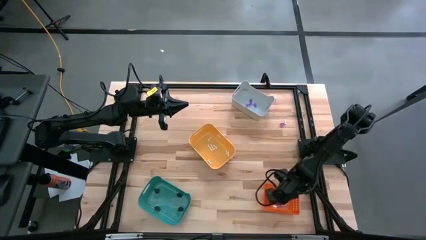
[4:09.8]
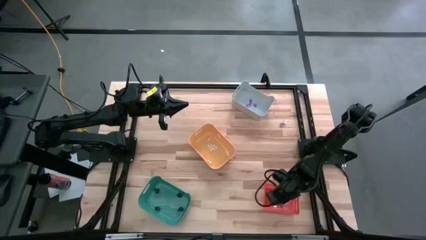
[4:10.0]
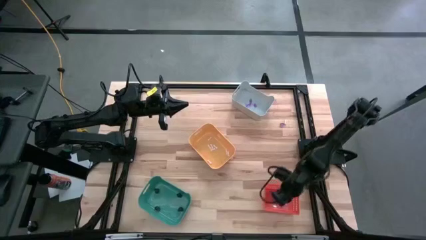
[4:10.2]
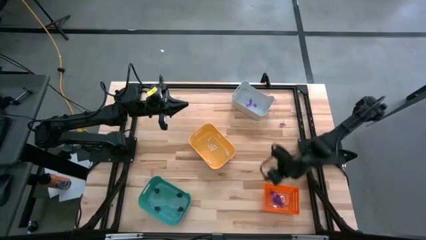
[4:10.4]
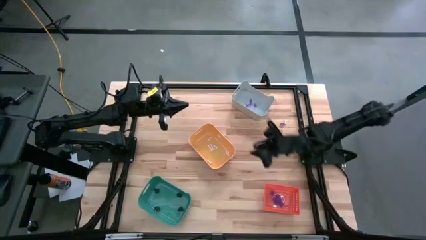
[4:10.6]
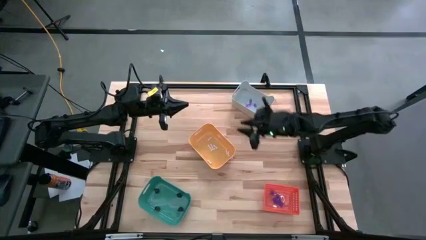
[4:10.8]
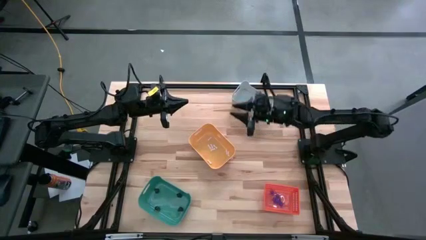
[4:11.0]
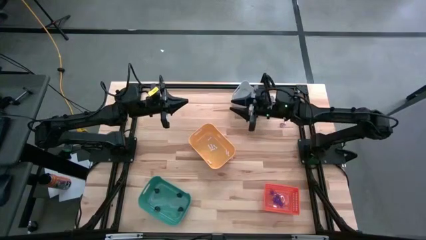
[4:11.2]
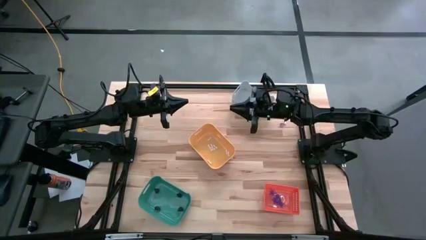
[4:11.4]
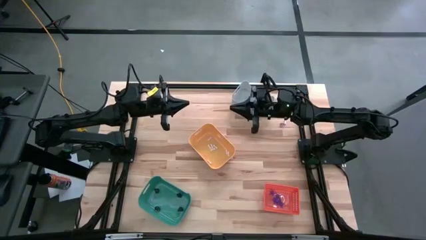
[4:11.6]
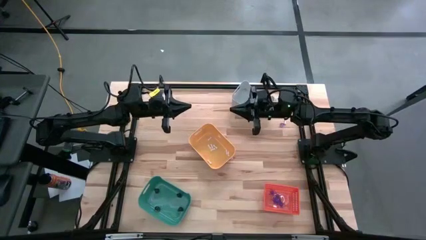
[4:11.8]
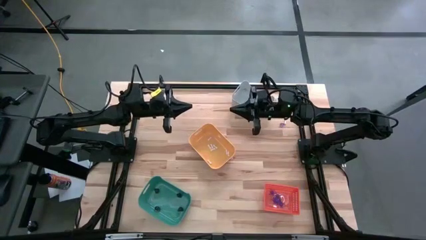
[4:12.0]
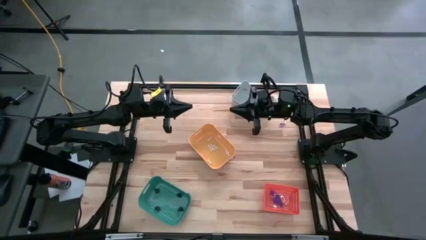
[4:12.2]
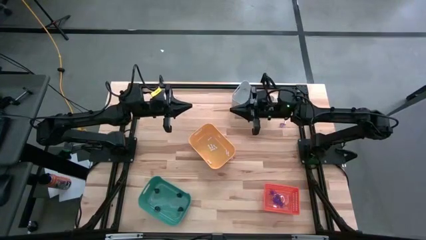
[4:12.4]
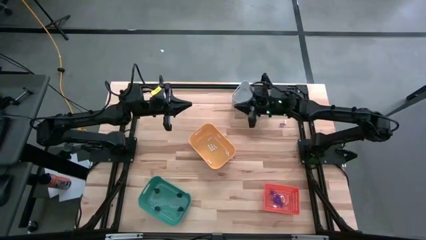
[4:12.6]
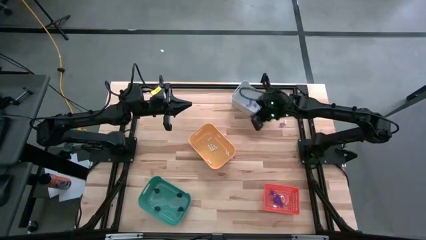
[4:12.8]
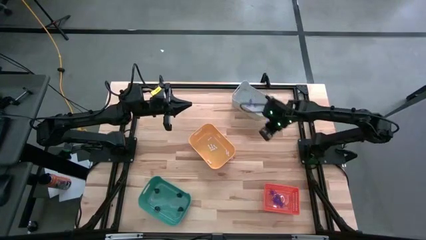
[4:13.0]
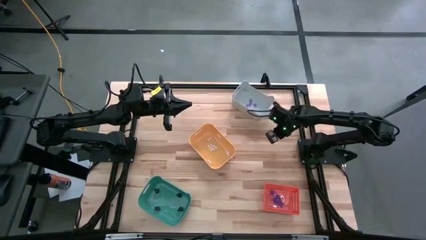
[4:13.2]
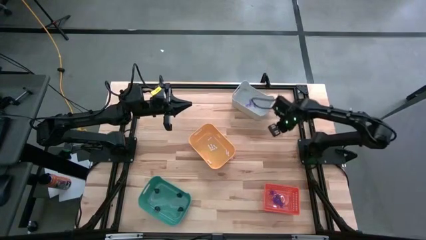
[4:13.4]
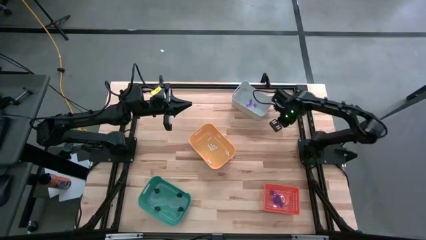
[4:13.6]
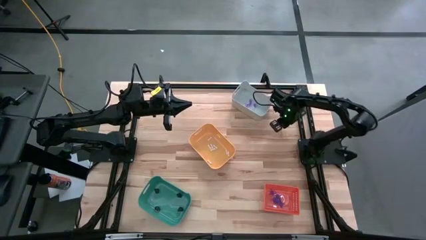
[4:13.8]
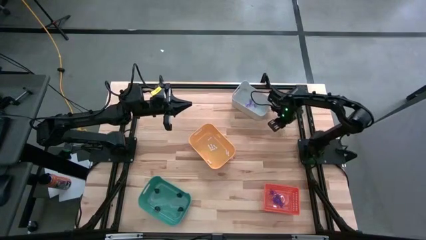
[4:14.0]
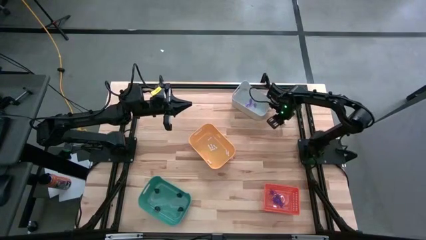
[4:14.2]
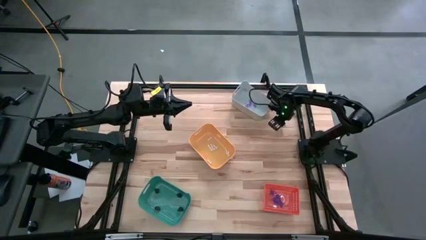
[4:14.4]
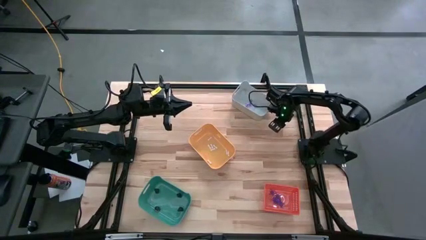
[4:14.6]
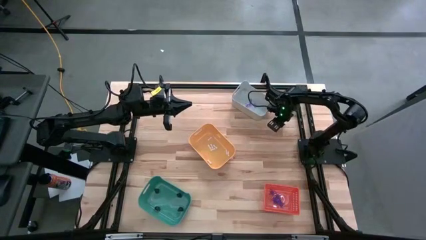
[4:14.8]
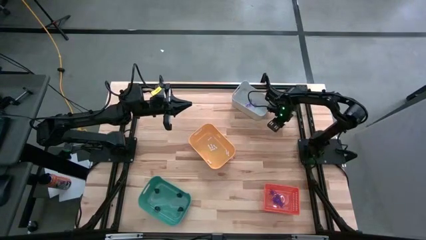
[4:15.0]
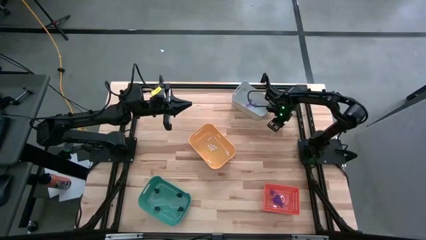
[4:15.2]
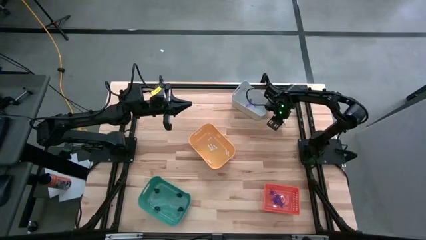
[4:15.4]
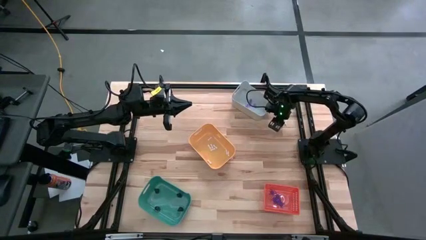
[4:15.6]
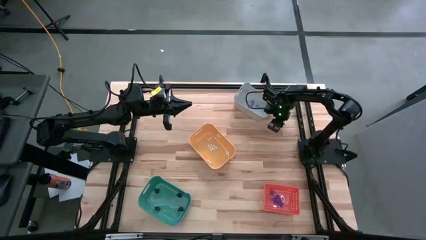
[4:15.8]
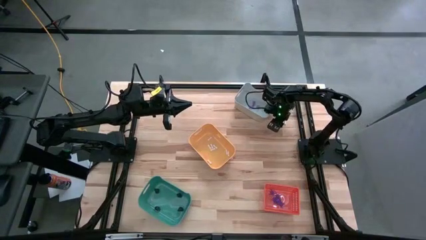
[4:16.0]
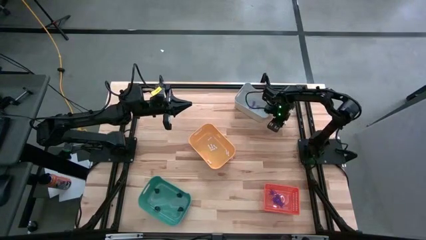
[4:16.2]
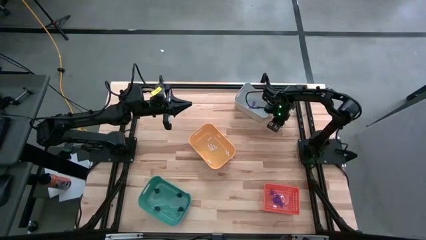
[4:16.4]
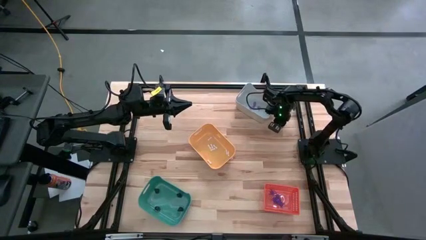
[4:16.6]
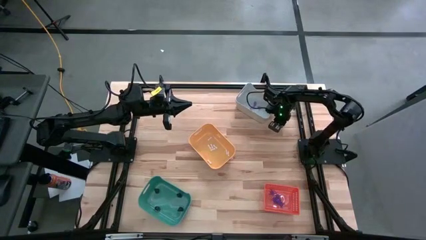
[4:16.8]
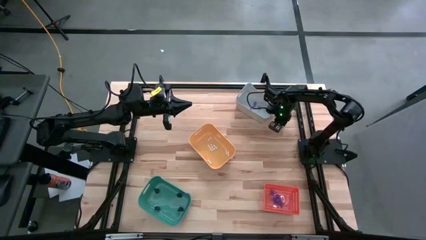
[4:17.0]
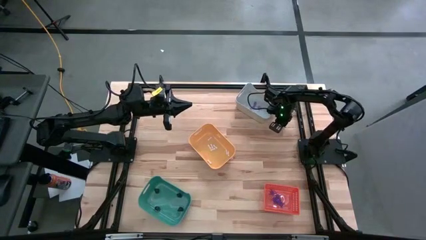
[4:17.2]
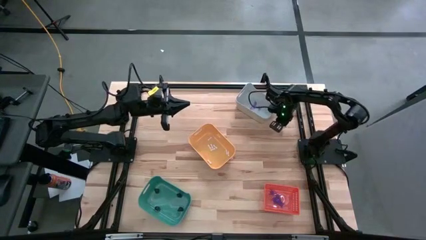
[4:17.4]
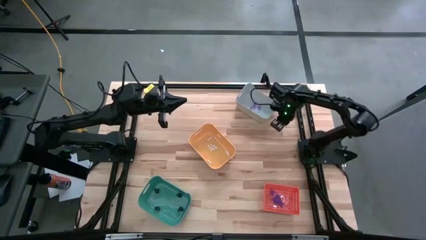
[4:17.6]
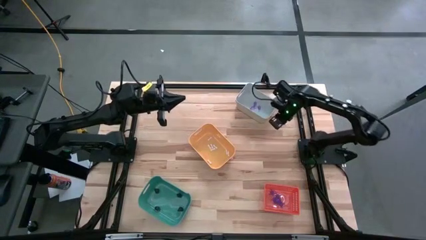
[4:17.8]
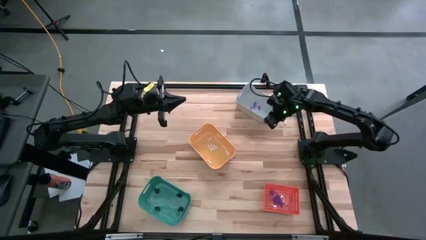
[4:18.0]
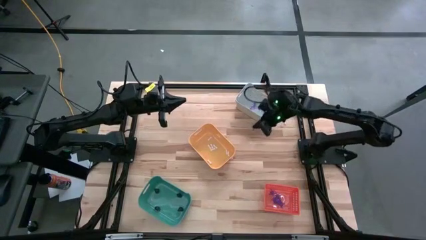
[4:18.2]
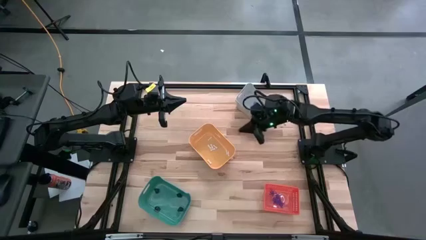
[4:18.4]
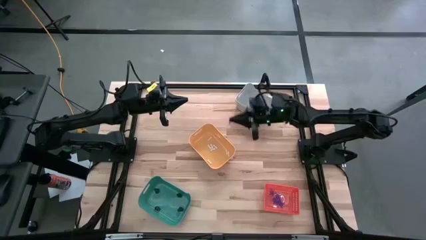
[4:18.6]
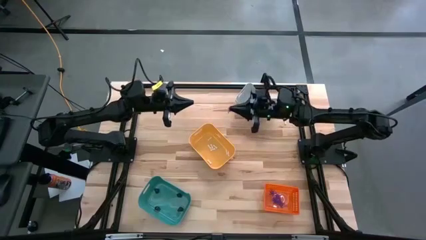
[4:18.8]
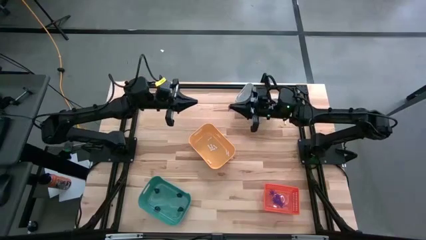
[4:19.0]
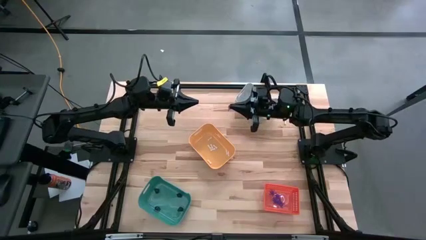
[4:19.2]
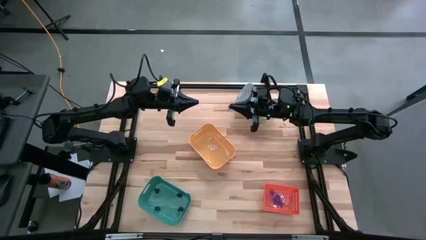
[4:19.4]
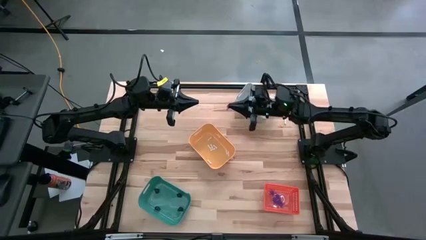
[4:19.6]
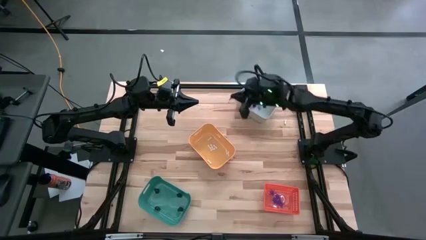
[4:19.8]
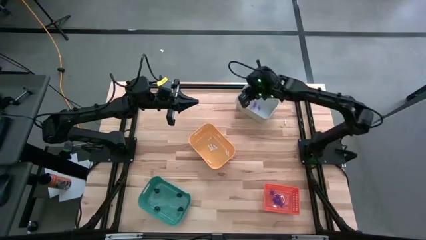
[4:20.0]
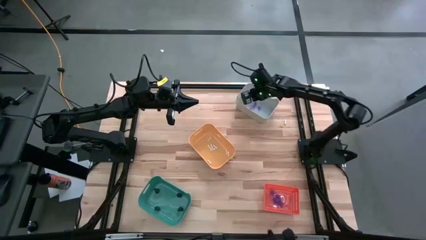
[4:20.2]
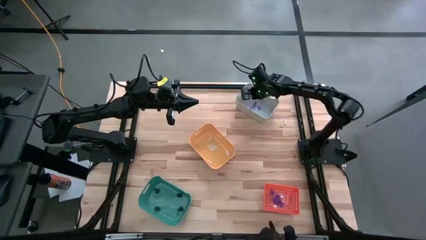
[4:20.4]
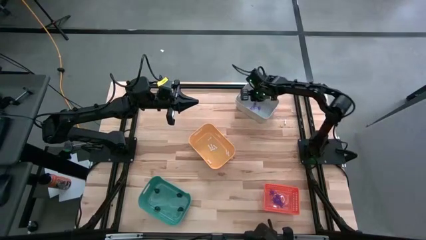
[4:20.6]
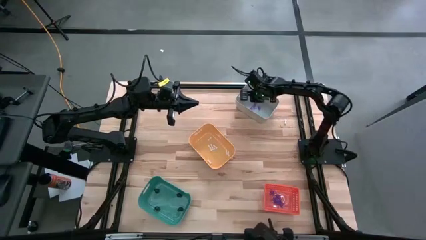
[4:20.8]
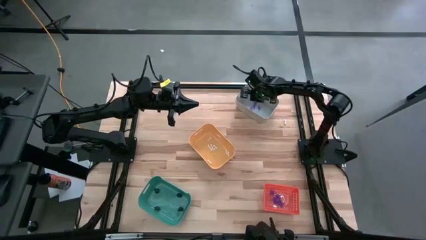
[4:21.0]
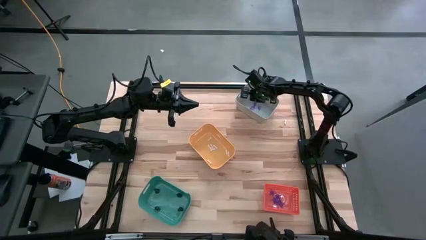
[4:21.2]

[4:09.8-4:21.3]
Task: Sort Halloween decoration
Put the purple witch hat toy into the white bin

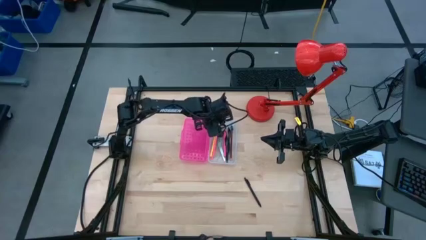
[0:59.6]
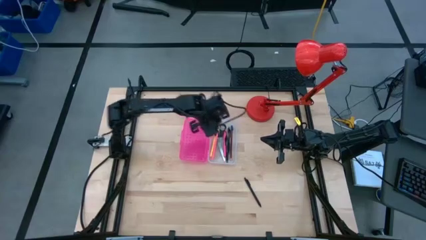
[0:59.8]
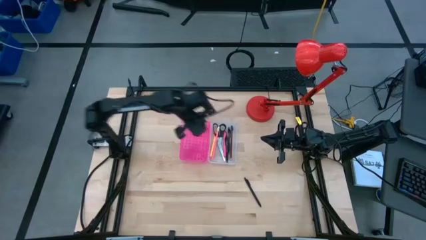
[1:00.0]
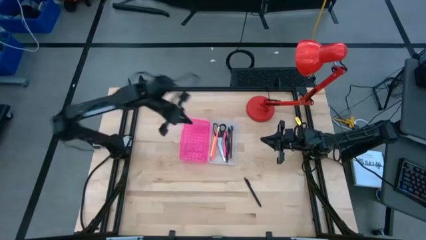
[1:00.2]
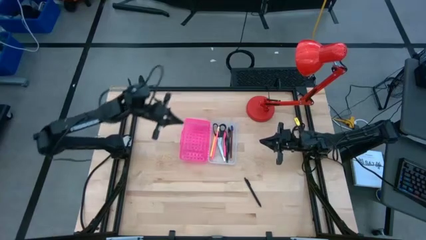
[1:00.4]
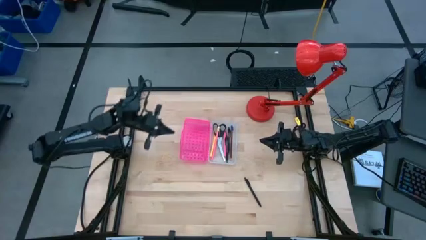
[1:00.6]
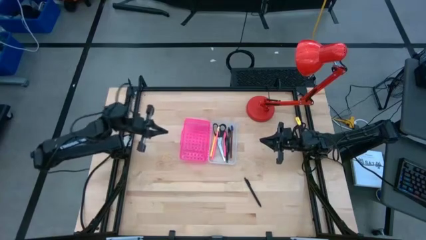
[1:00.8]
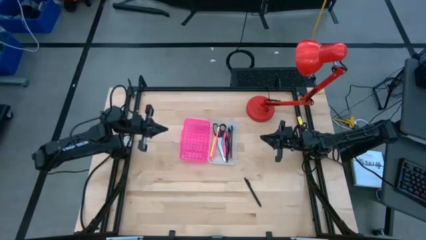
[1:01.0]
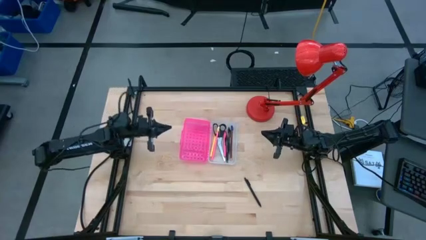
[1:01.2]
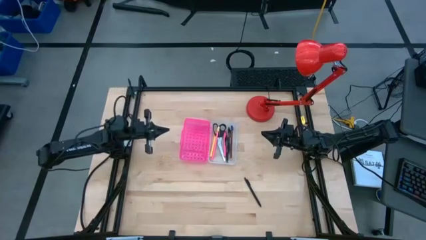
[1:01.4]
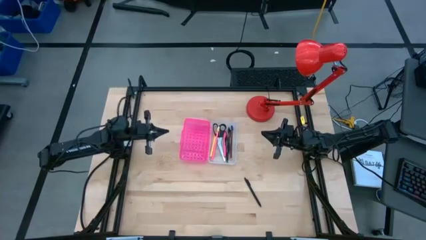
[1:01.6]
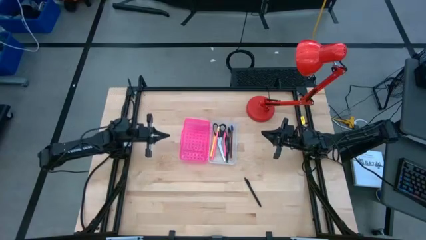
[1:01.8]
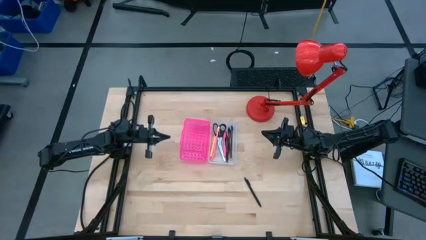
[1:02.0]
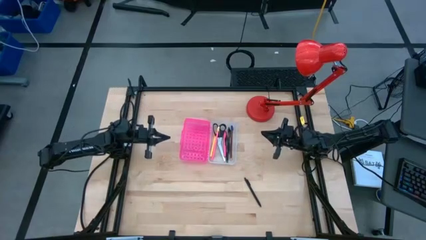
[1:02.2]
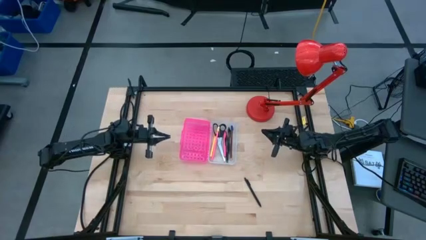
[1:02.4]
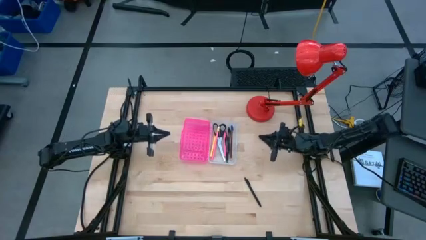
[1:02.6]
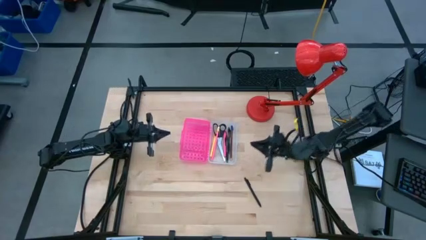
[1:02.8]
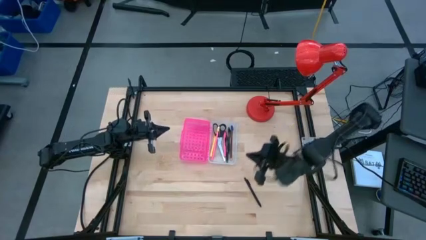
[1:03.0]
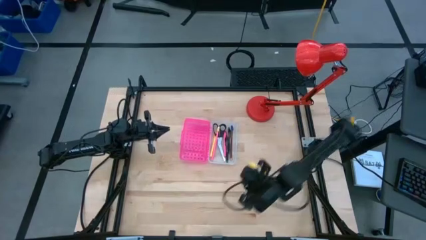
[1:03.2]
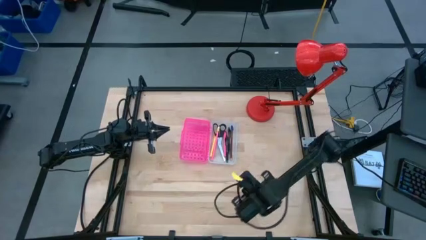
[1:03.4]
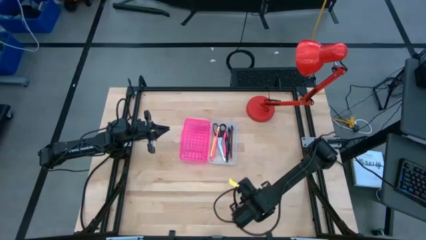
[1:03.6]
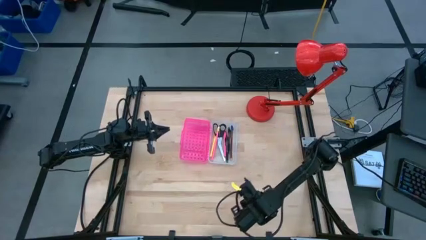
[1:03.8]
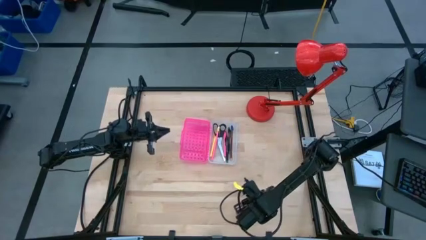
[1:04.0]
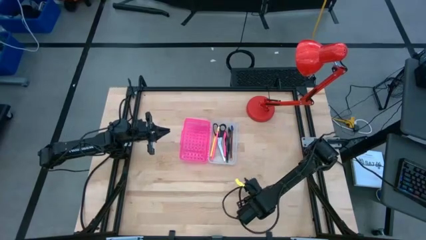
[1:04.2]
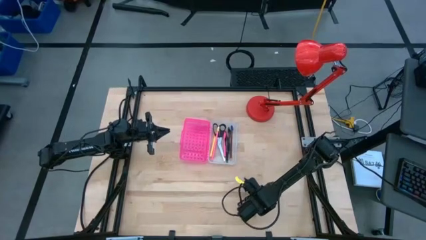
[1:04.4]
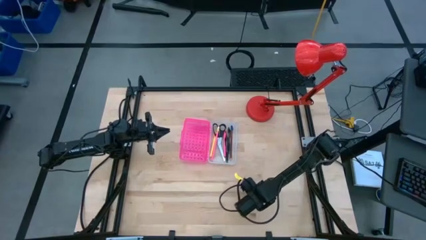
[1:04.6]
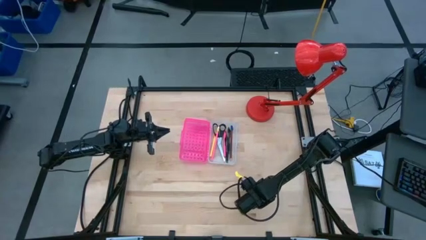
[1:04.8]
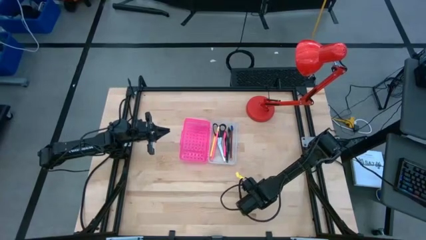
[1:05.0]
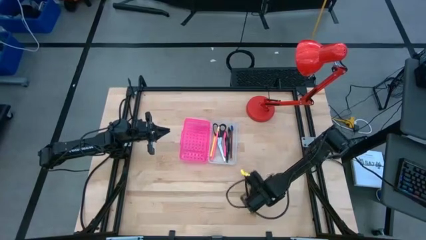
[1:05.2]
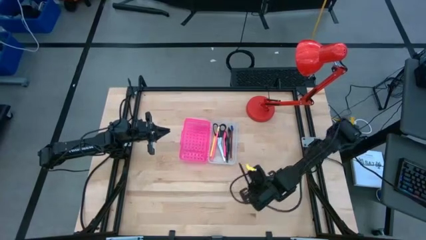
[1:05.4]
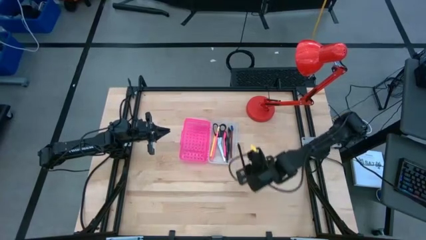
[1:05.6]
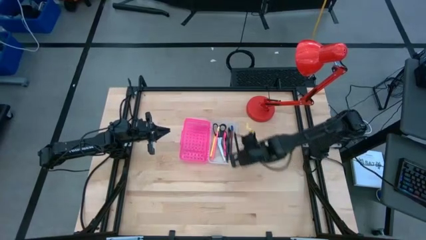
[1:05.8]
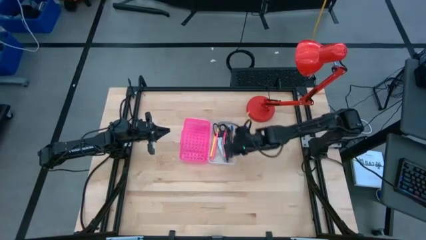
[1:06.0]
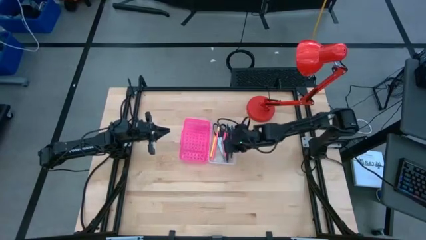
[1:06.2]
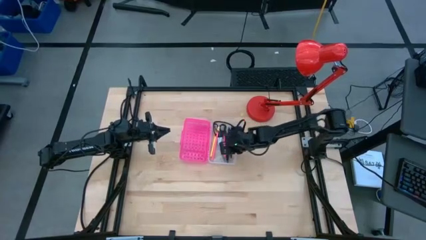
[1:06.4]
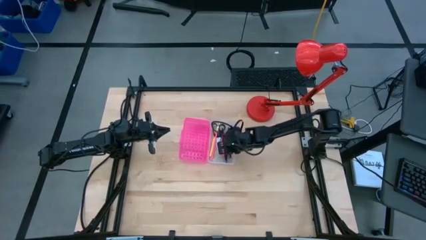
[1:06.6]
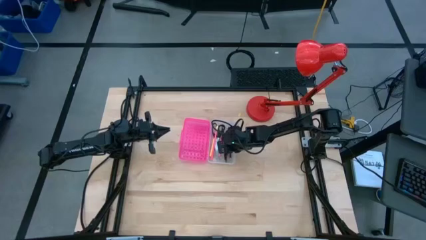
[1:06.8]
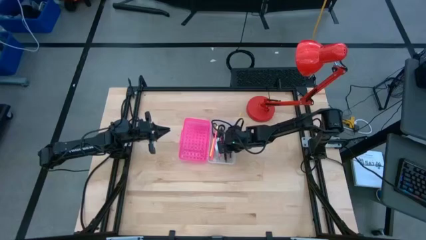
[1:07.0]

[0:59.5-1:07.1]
Task: Pick & place school supplies into a supply box
Put the black pen into the supply box
